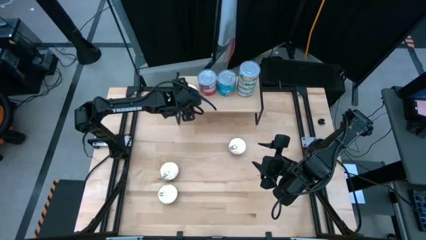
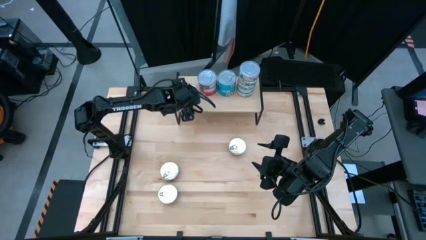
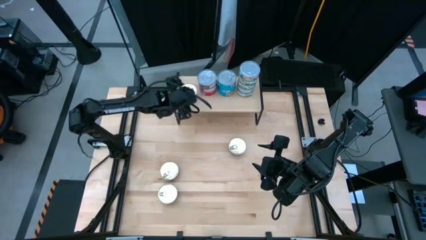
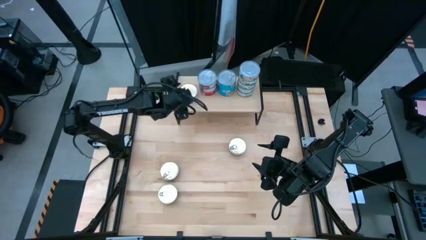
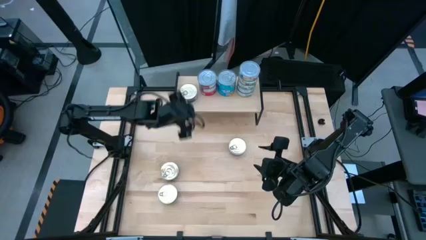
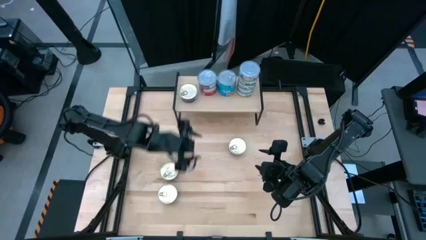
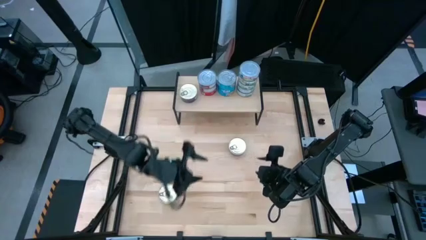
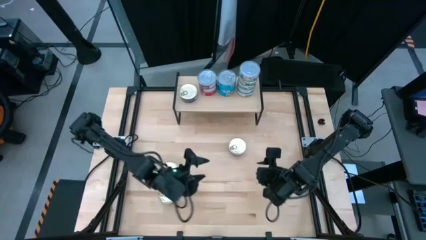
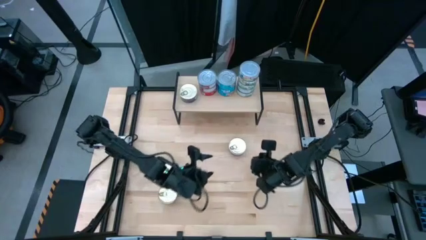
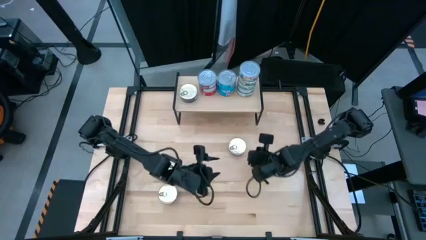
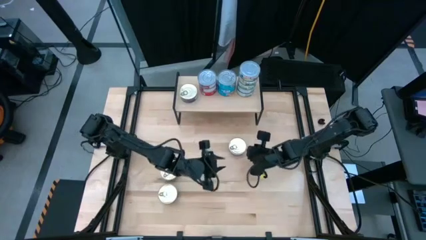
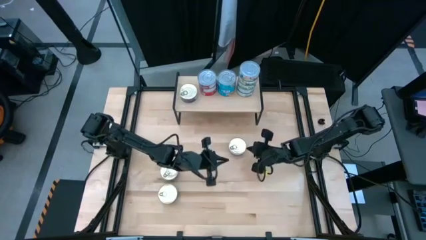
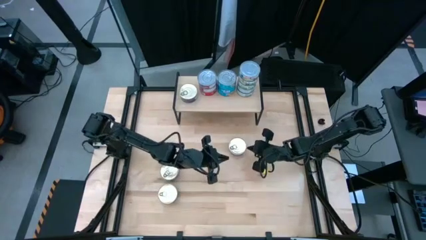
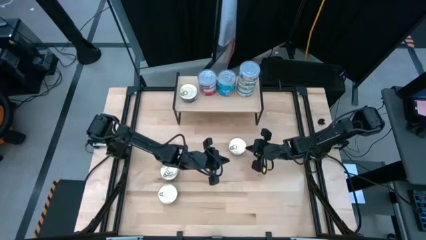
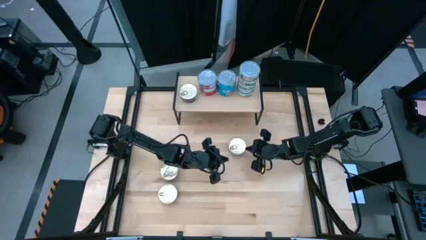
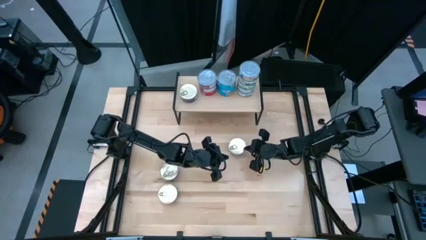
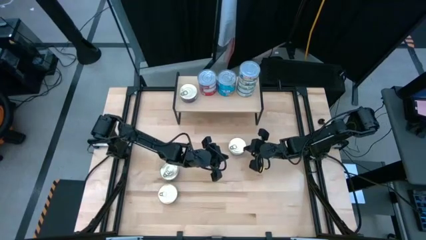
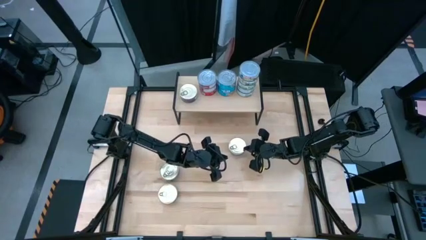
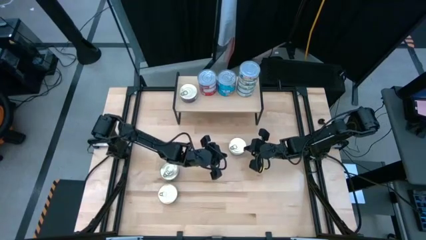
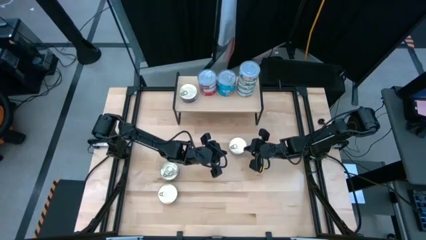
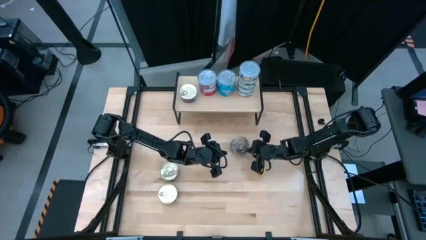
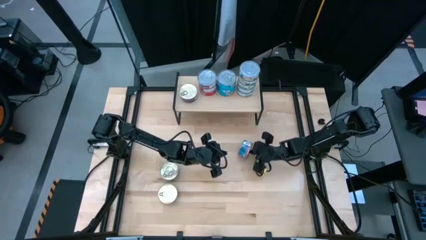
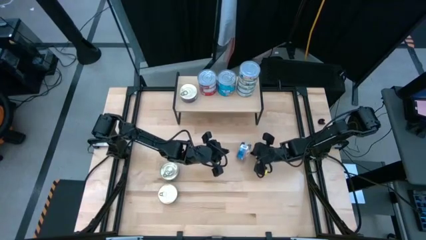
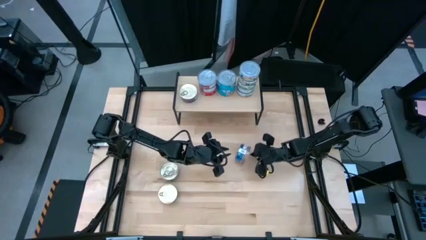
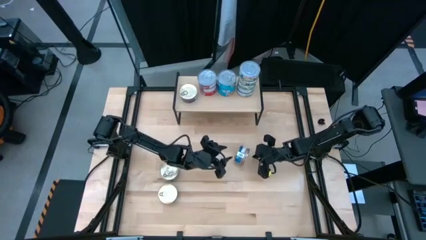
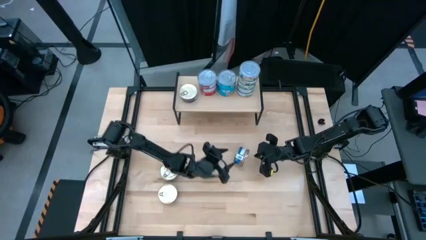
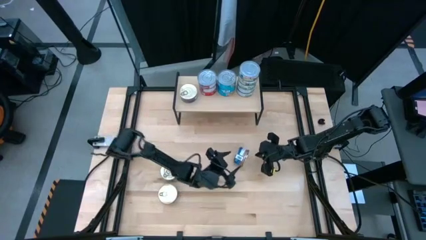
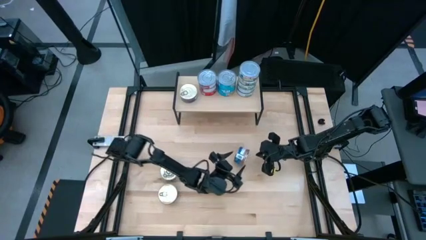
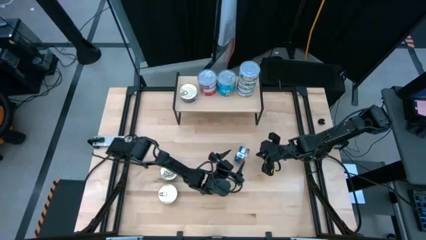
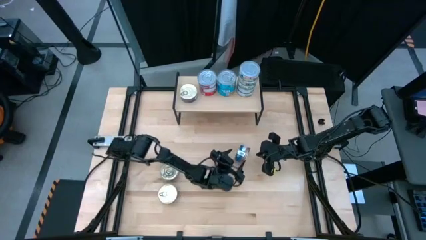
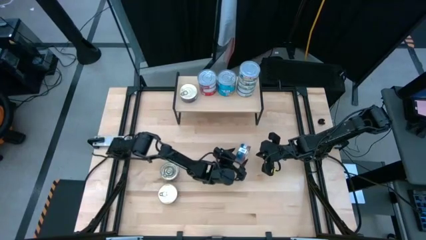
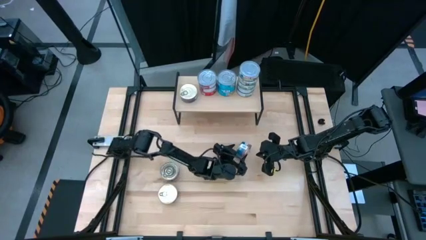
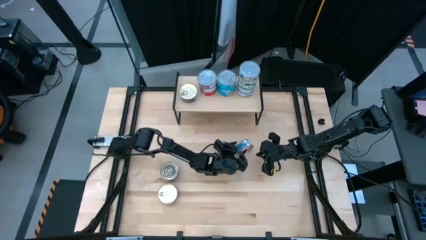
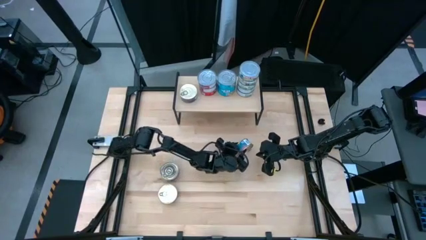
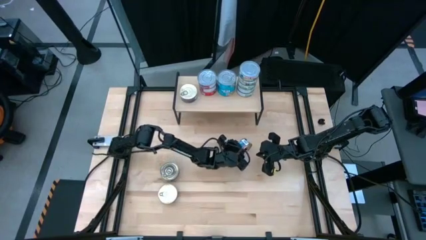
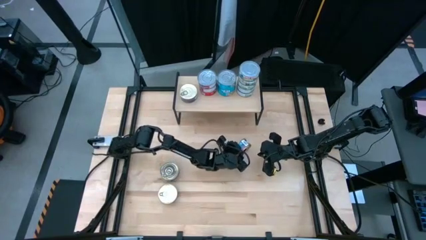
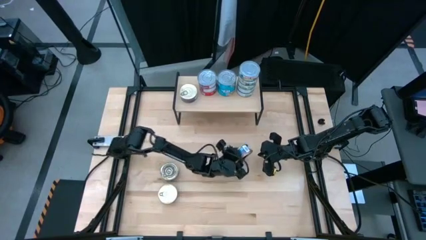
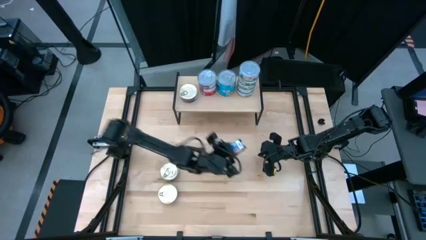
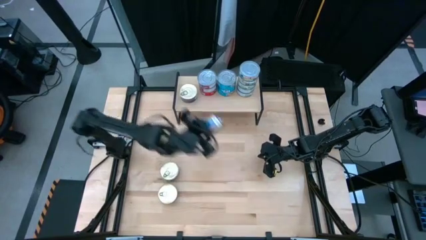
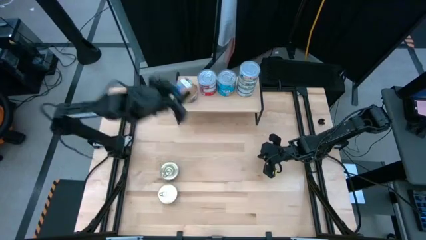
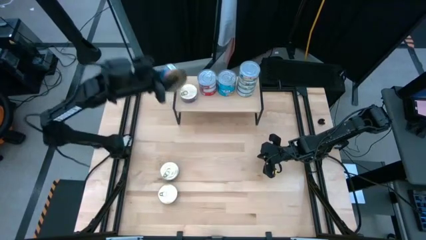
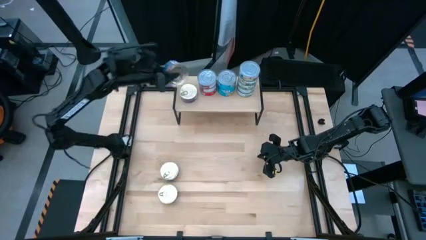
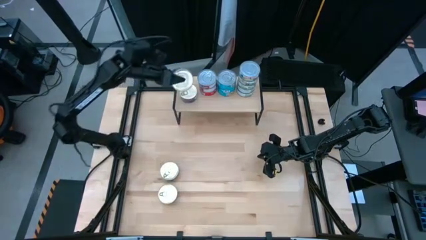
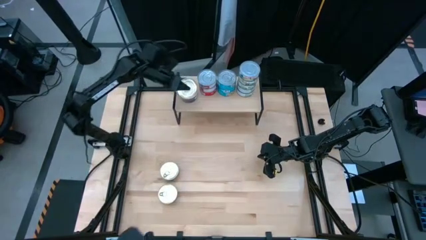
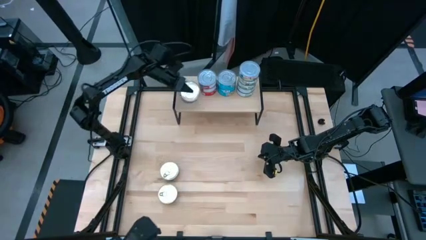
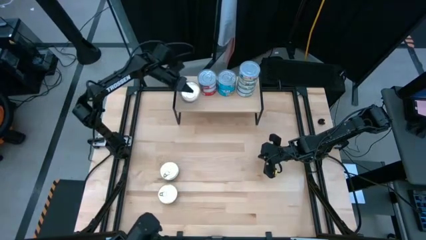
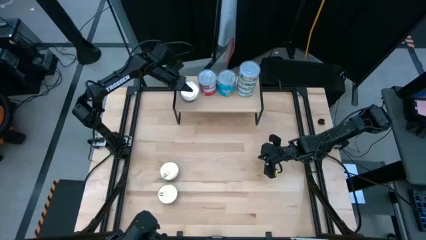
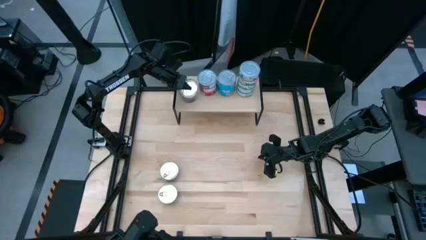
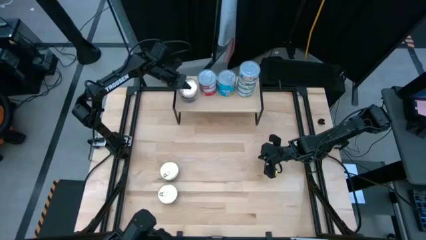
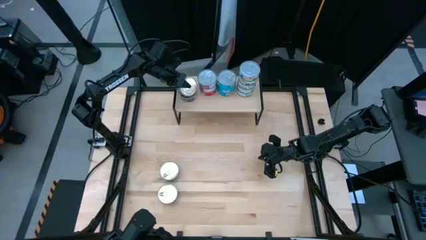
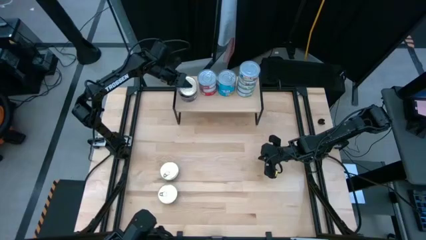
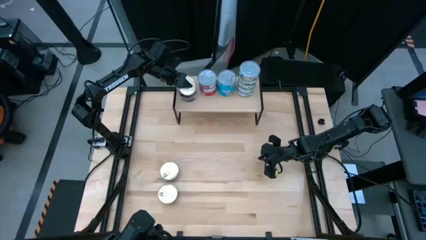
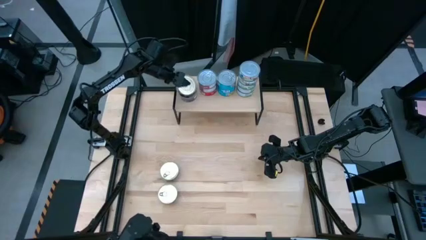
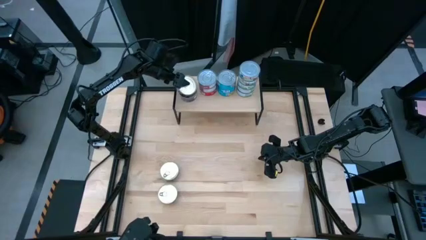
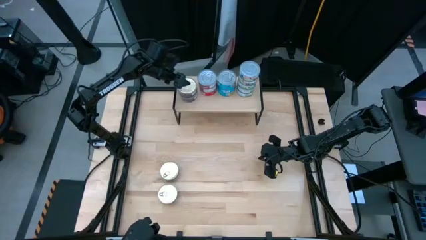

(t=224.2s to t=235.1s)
Task: Stack canned seafood by type on shelf
Stack the blue pink tuna can on top of the other blue tuna can on the shelf

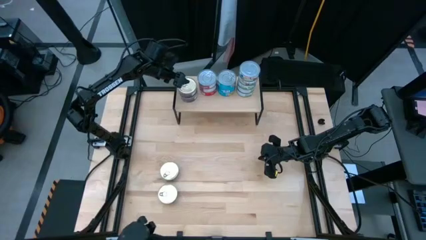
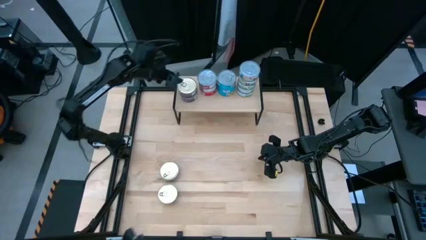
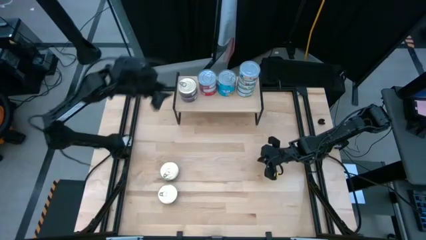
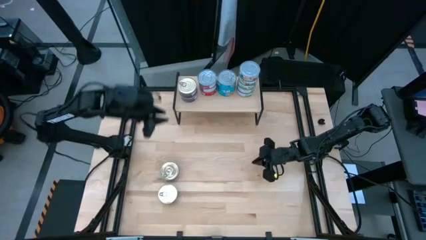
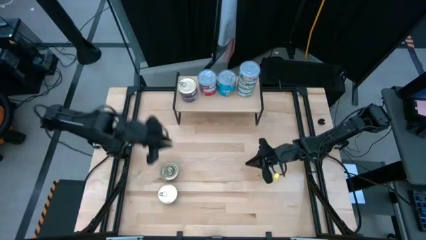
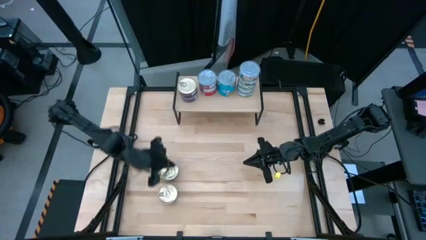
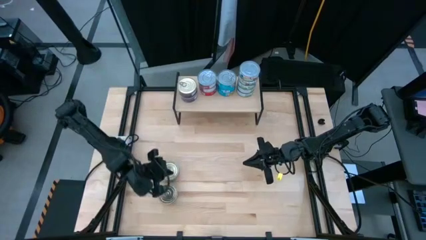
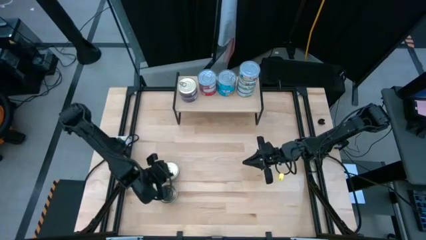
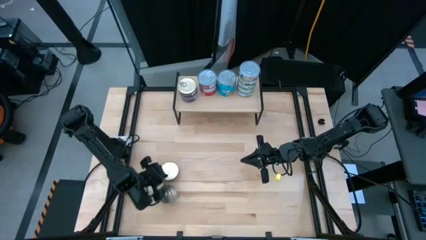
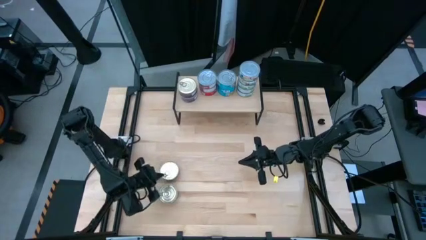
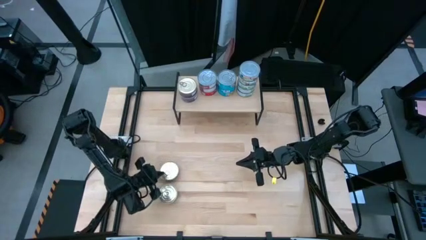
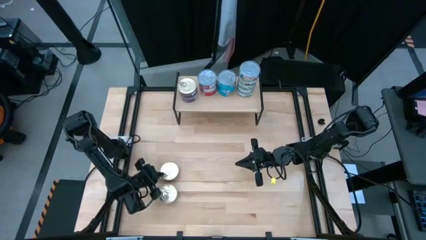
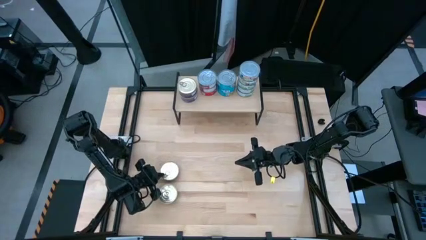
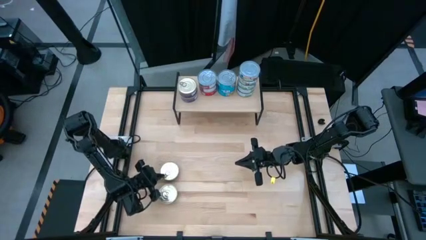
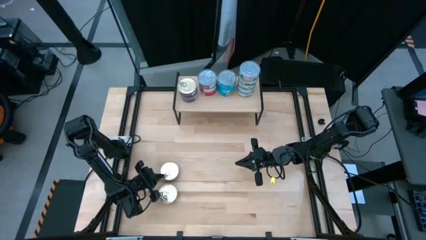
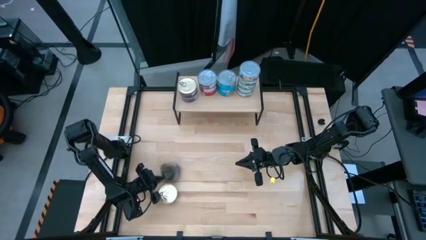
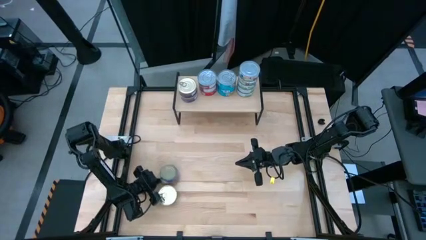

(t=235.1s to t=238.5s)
Stack the blue pink tuna can on top of the other blue tuna cans on the shelf
